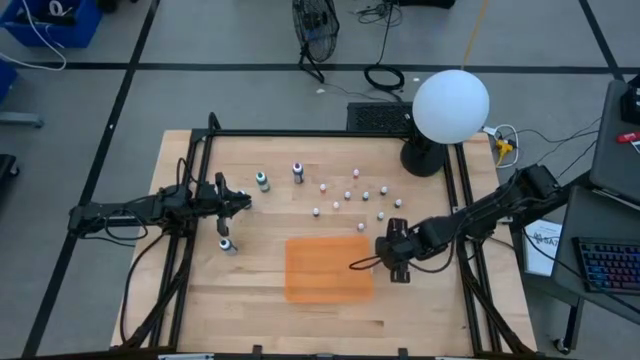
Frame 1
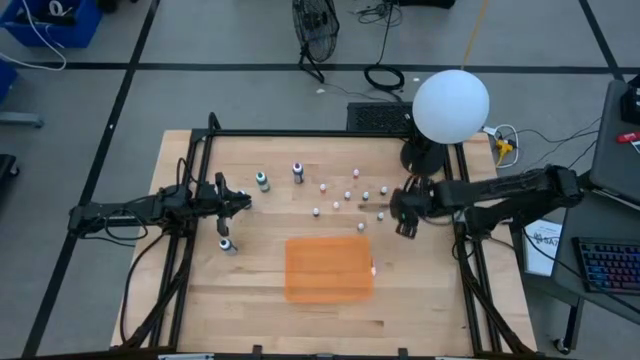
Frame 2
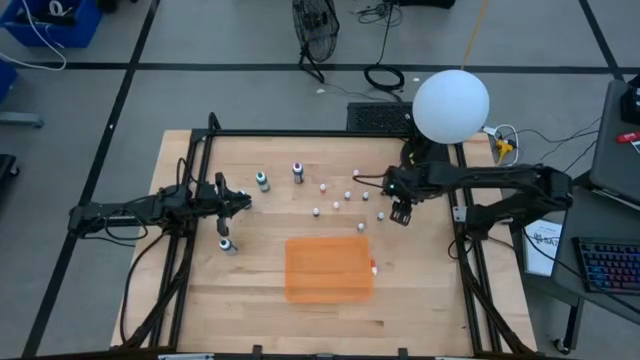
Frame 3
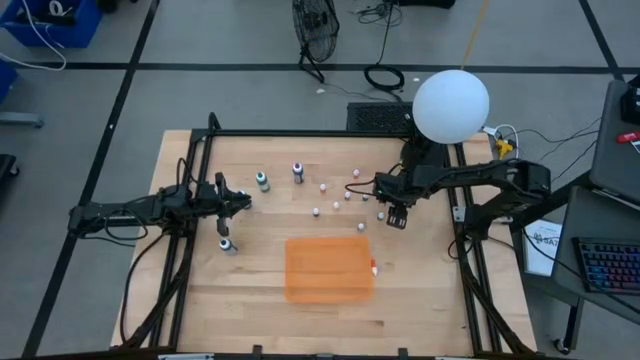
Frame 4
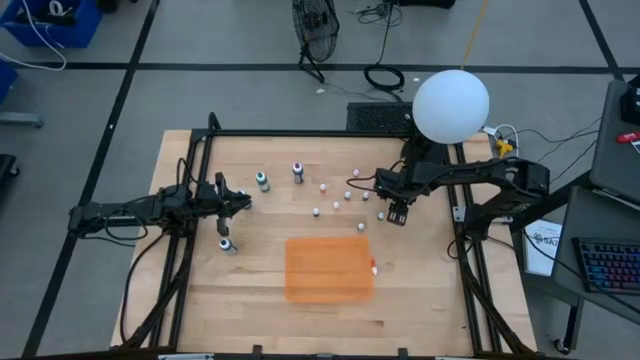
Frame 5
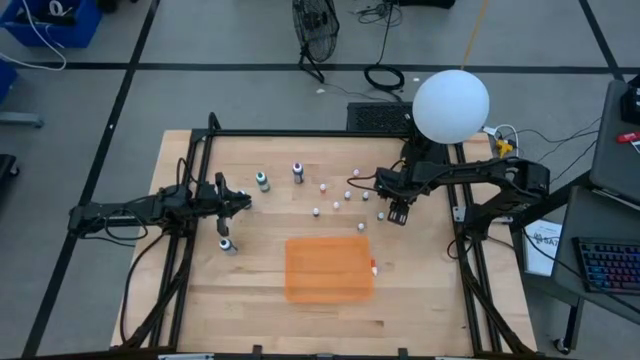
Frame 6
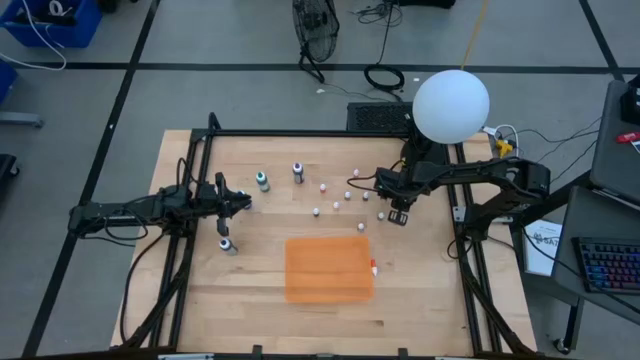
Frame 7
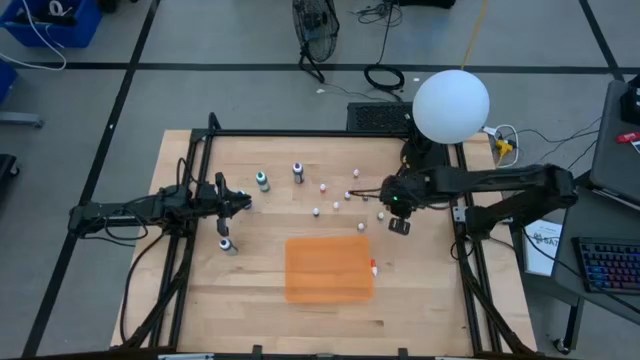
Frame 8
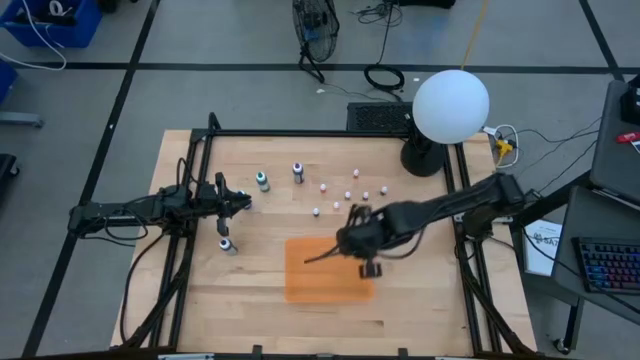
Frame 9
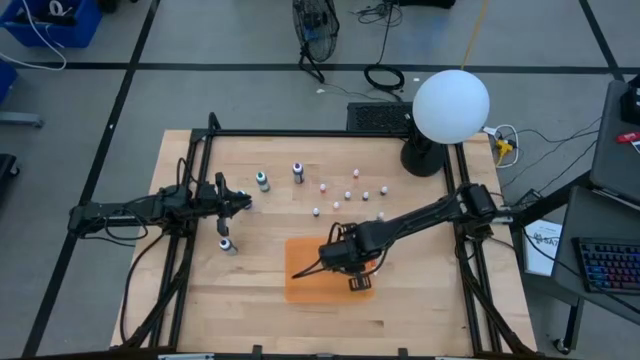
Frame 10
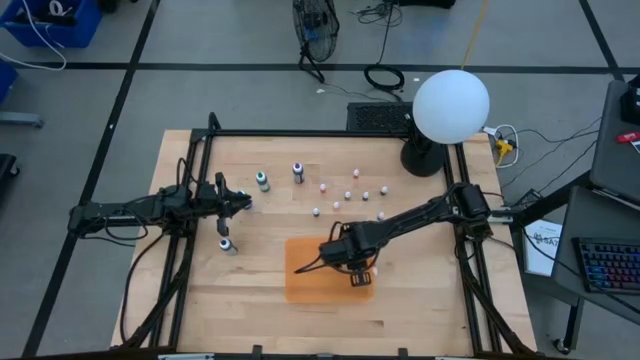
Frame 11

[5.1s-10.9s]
Task: Pick & Place food coloring
Put the small black food coloring bottle into the orange bin

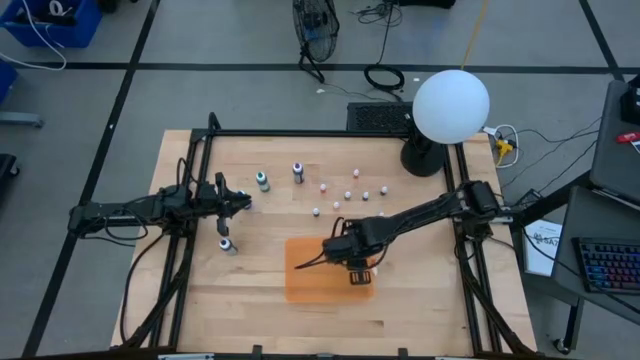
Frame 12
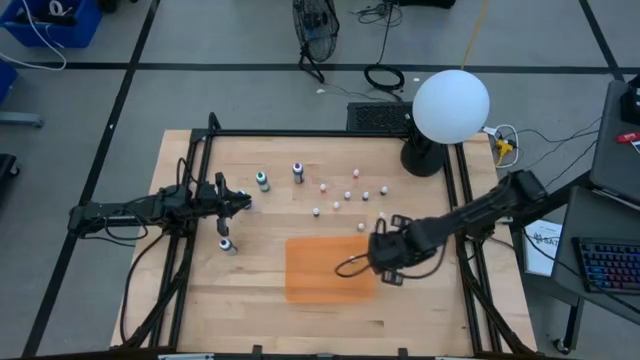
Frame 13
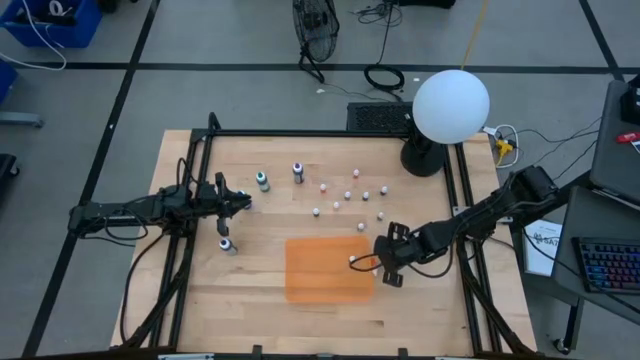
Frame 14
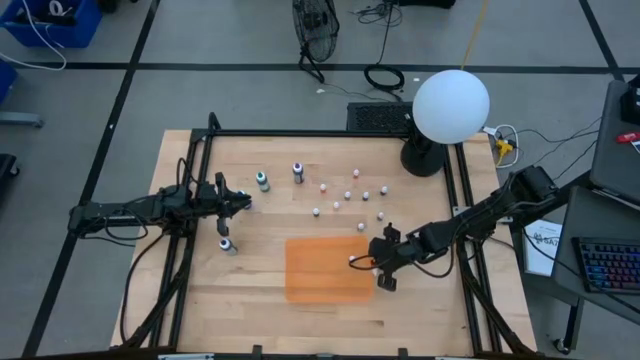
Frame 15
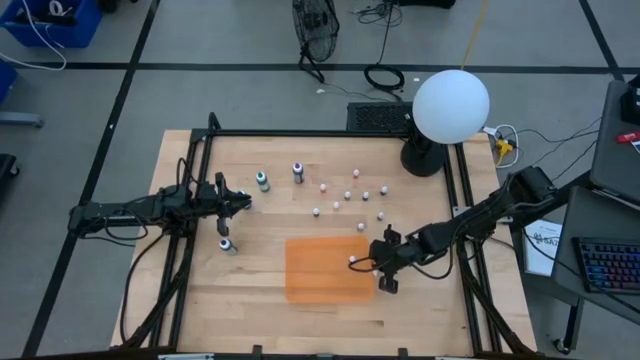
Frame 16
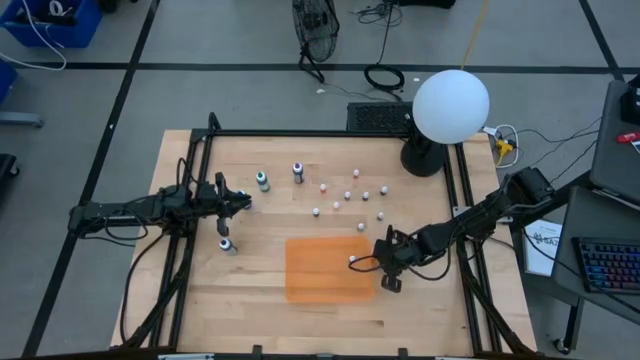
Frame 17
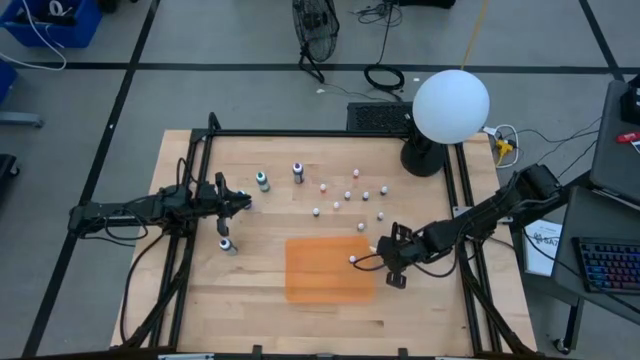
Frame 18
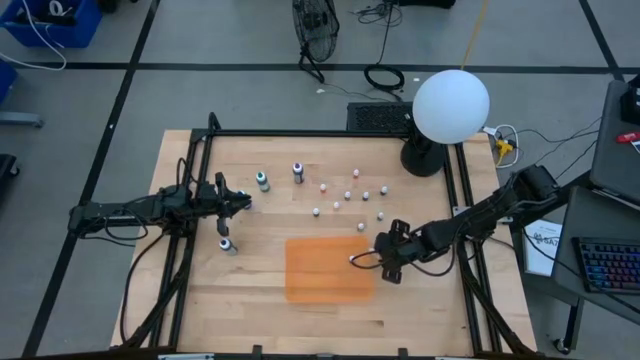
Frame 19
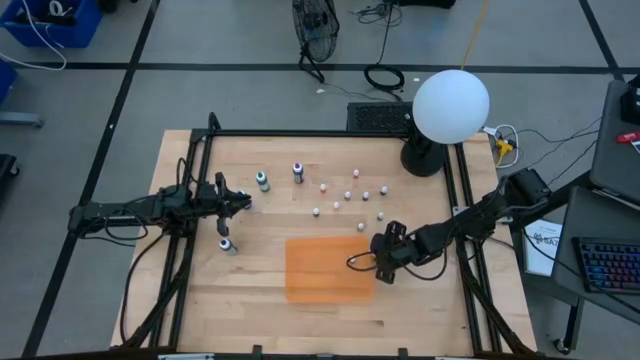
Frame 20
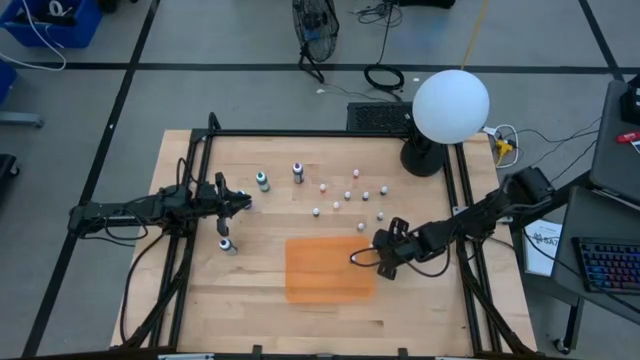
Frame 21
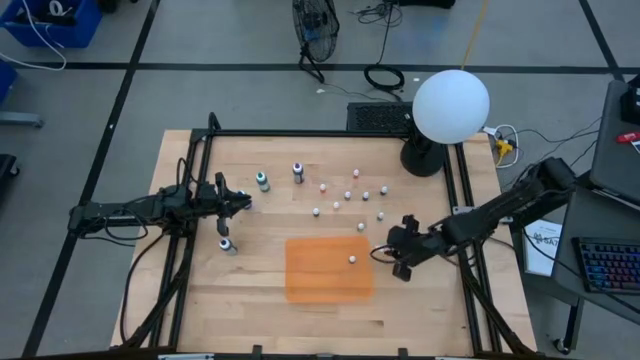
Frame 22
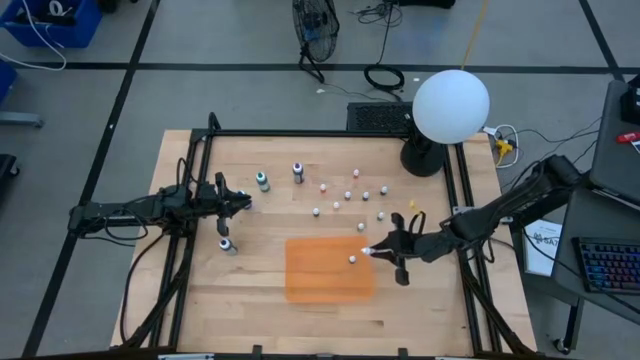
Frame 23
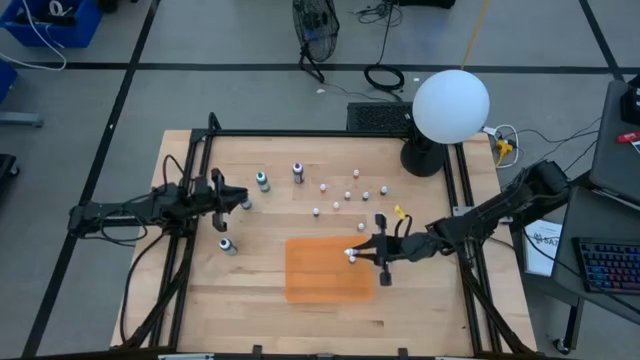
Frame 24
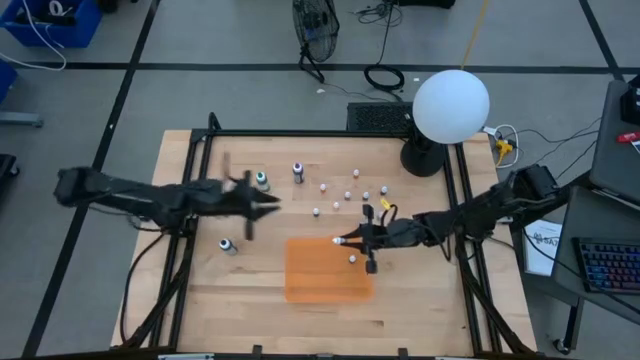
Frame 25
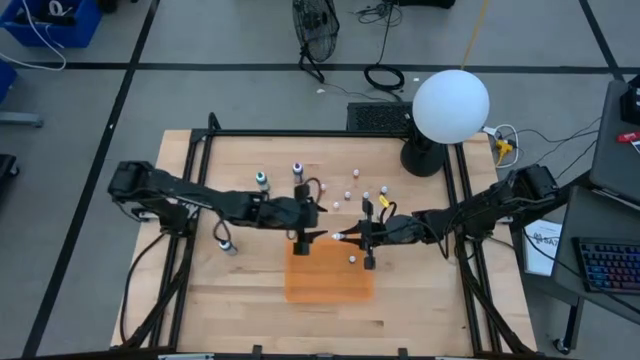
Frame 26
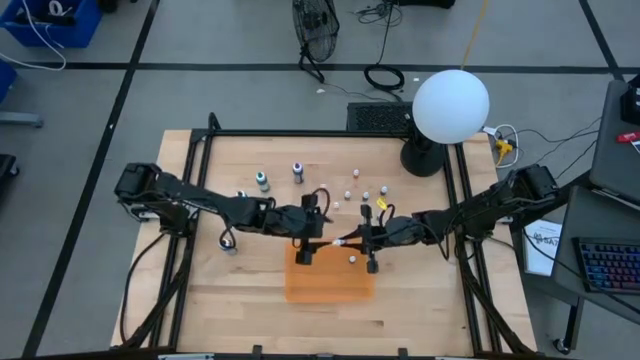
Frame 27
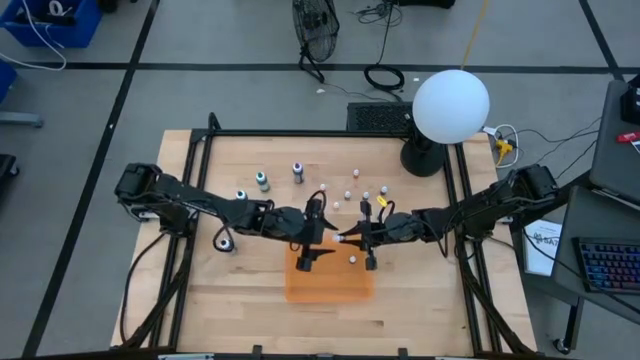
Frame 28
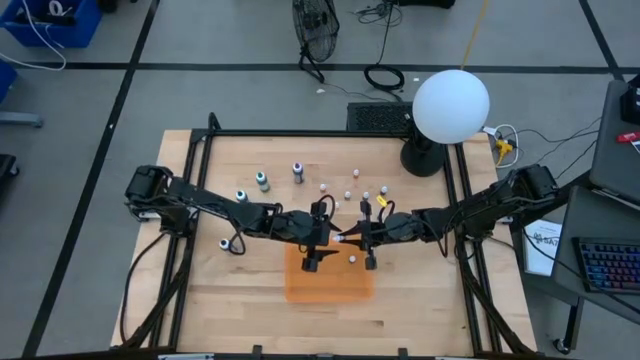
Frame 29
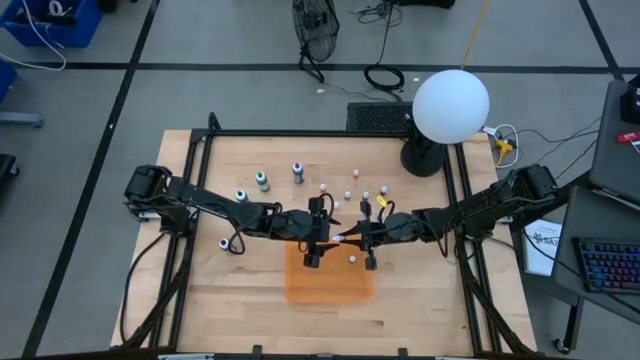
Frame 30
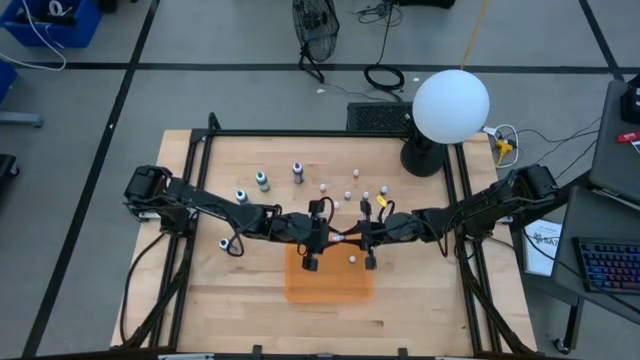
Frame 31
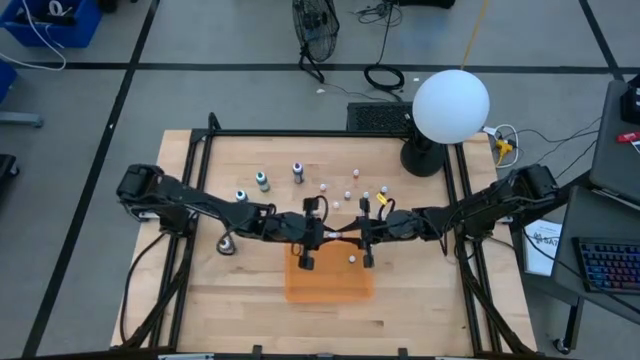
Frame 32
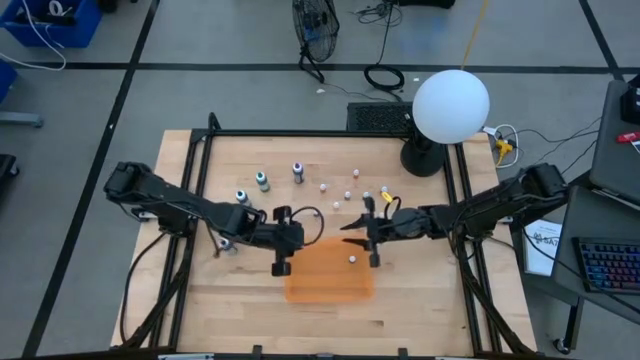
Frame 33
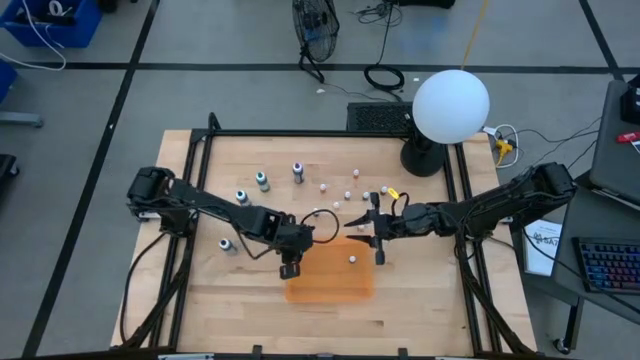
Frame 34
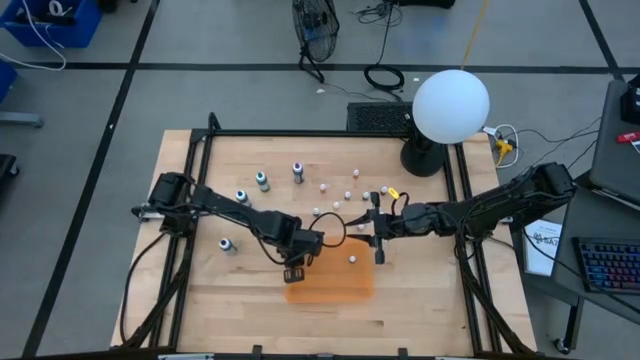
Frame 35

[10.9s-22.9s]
Put the small orange food coloring bottle into the orange bin

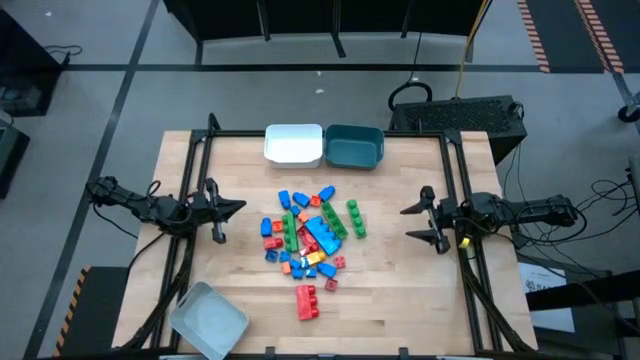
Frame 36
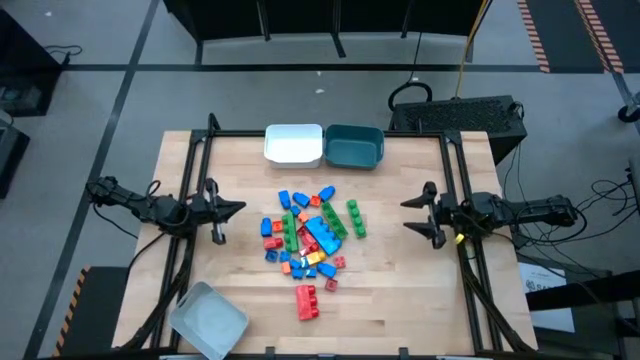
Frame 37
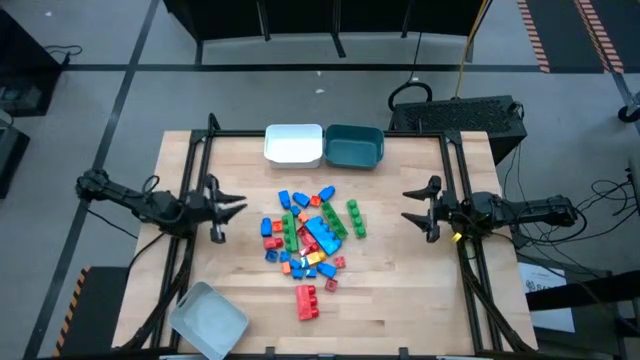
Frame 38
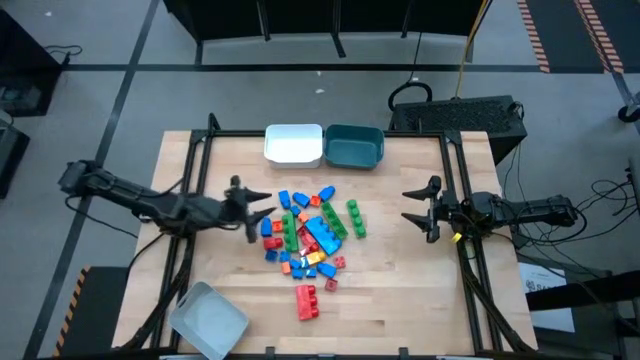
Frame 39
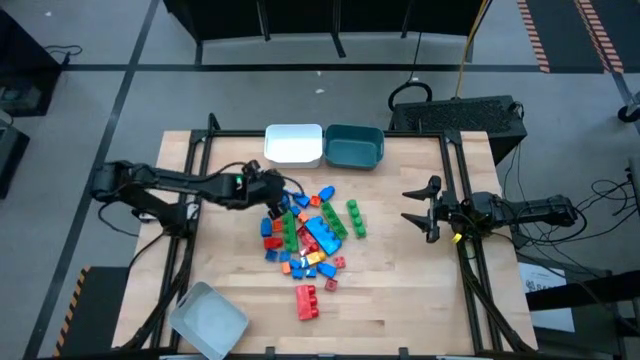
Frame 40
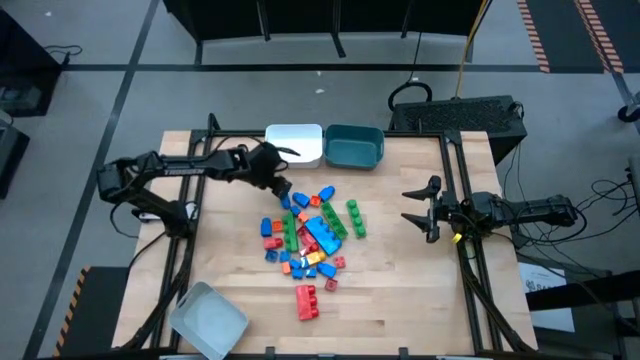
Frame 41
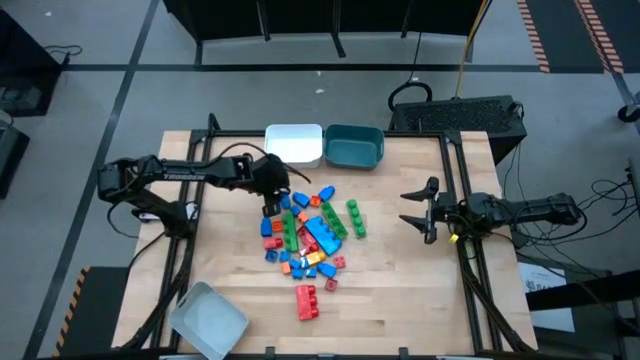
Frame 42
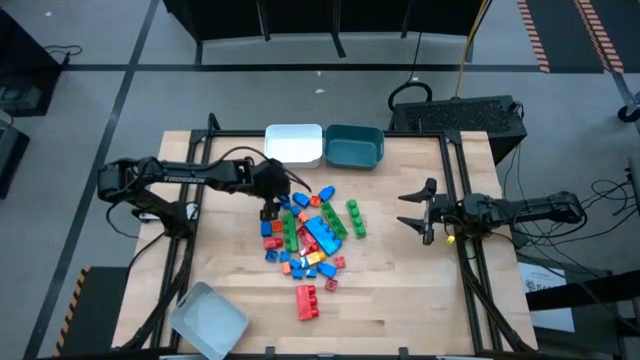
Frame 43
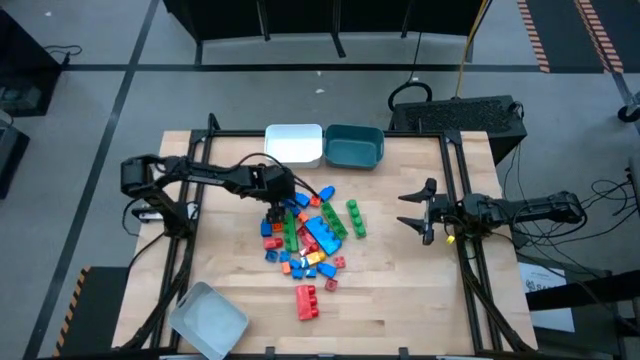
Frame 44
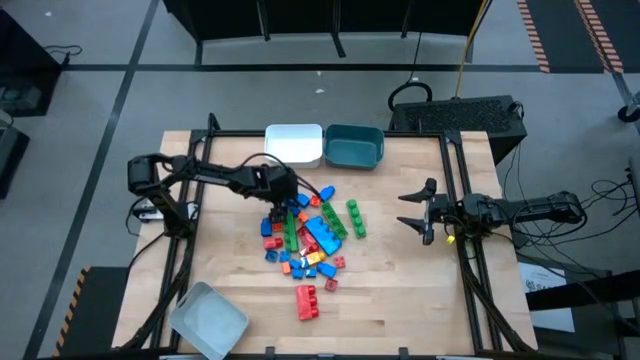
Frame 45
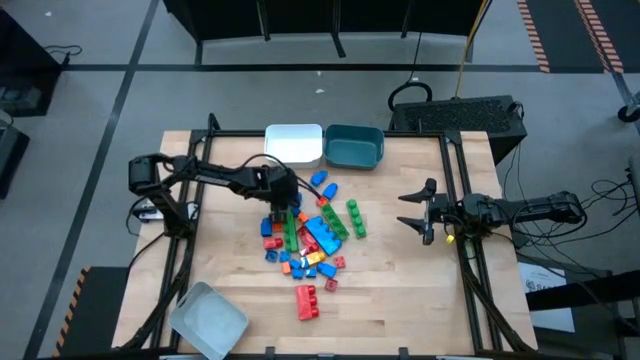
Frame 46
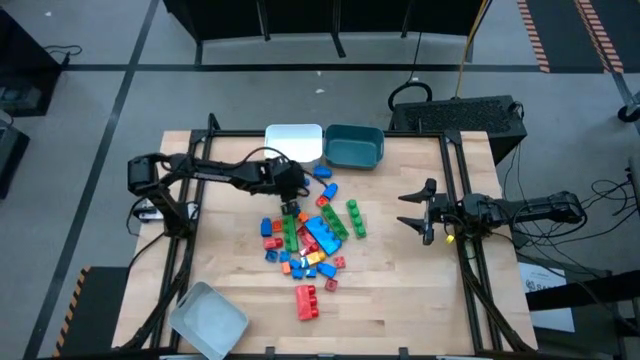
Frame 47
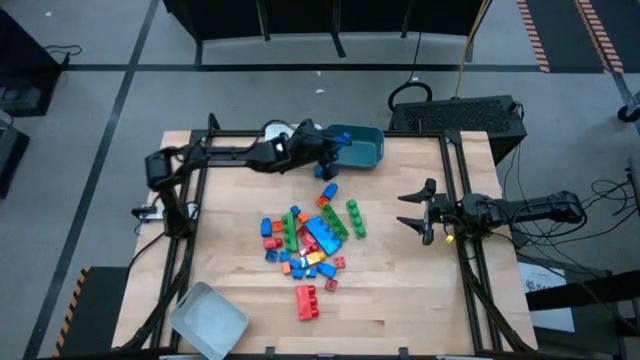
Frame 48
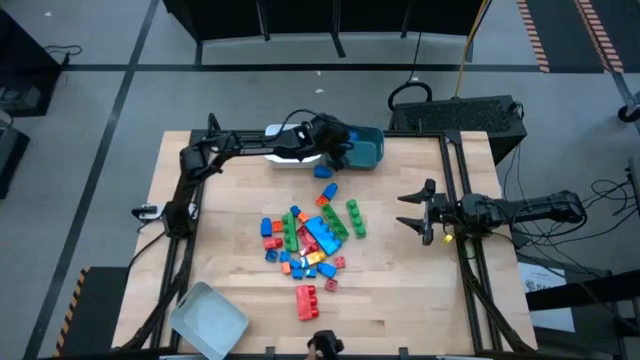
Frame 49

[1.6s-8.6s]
Task: Sort blocks by size
Put the blue 1 stud game piece into the blue bin
